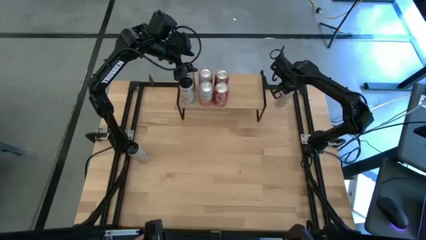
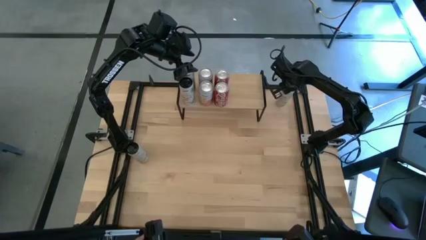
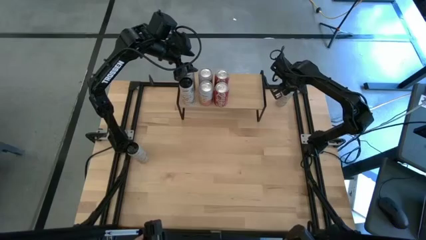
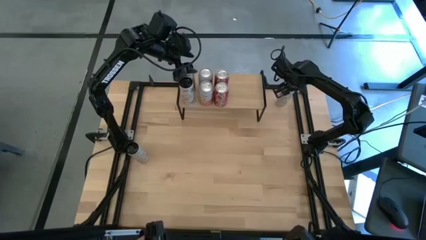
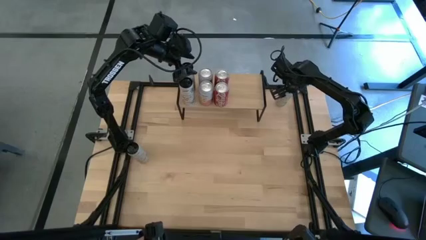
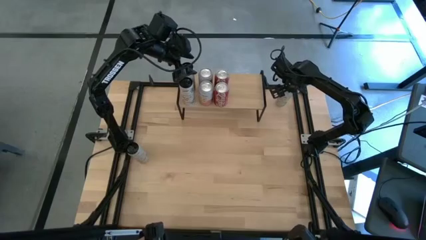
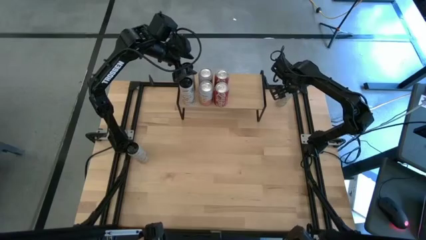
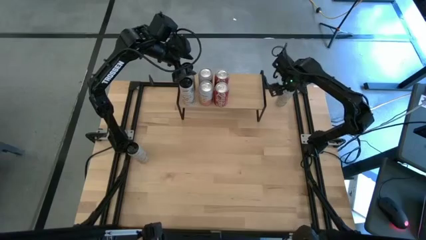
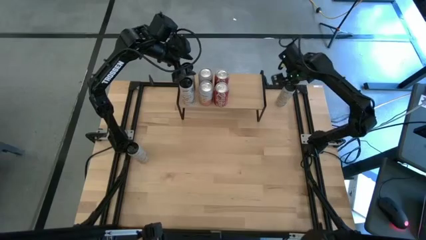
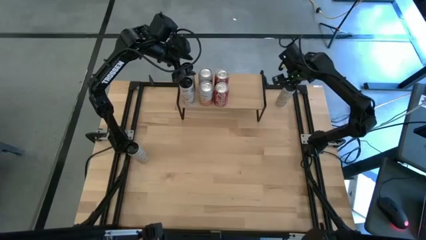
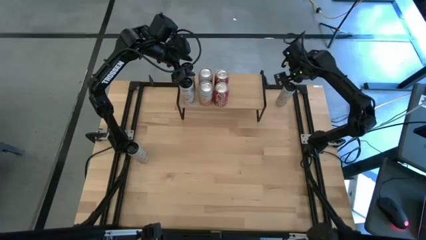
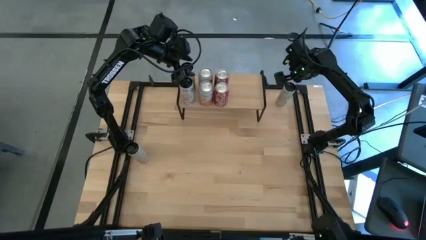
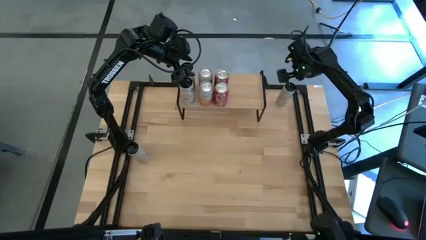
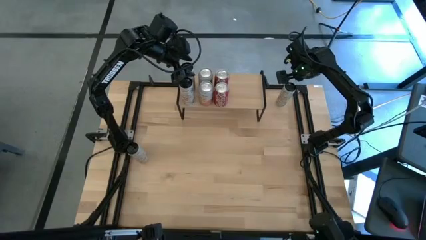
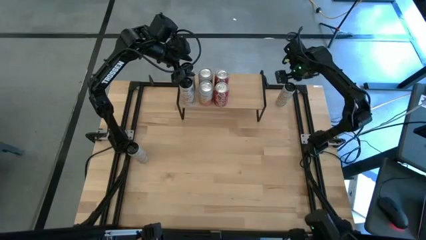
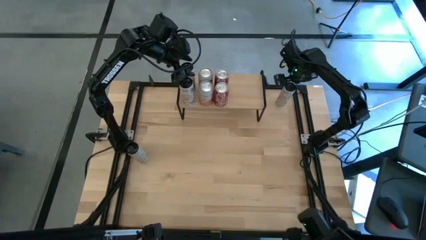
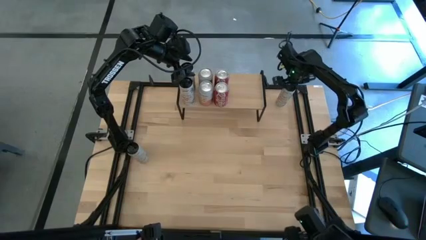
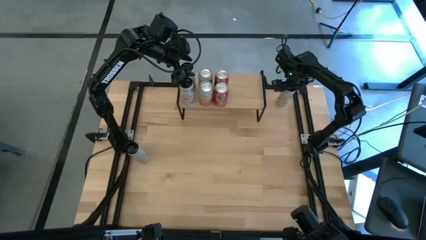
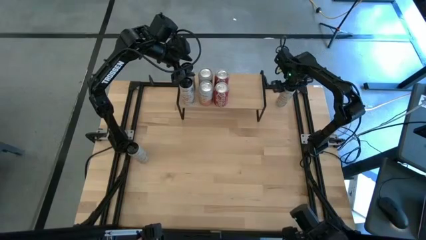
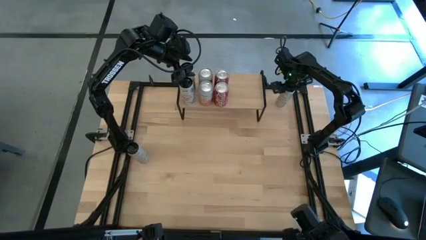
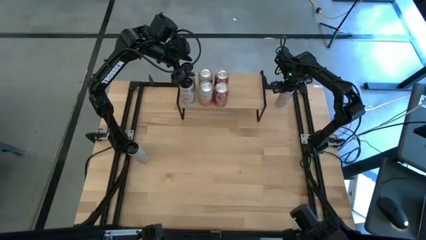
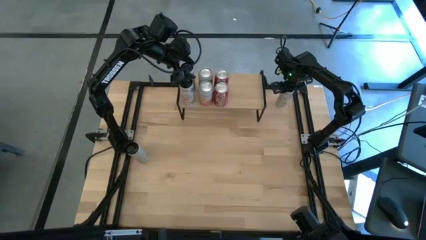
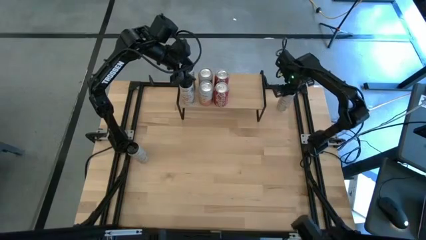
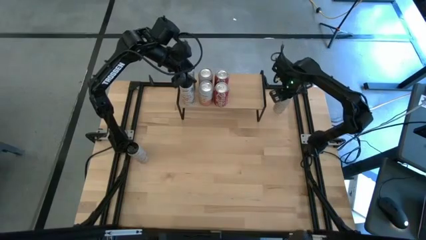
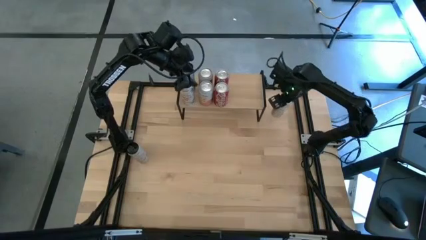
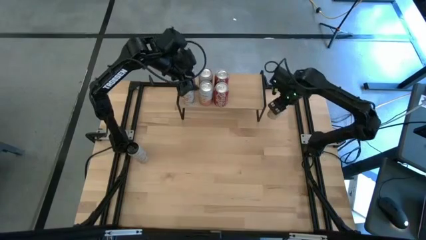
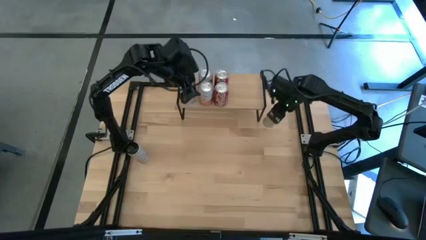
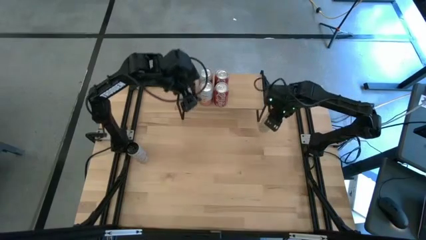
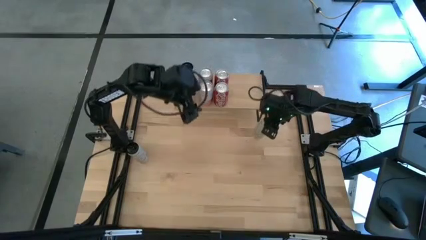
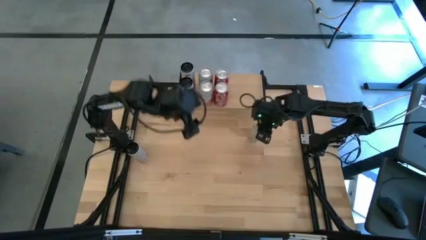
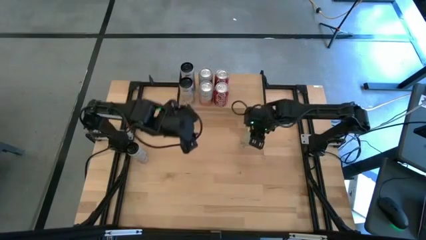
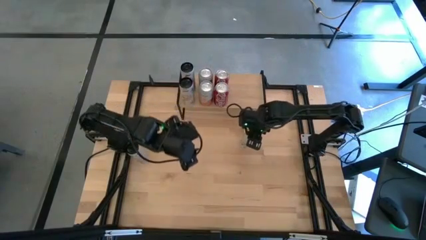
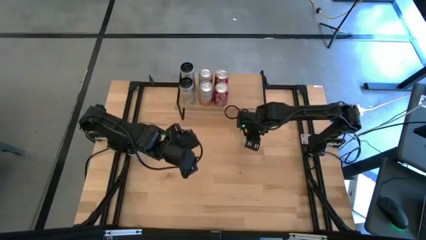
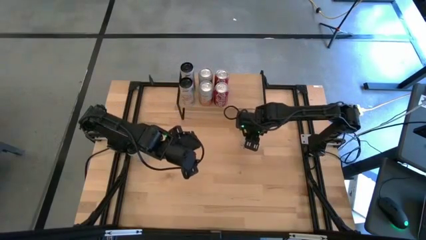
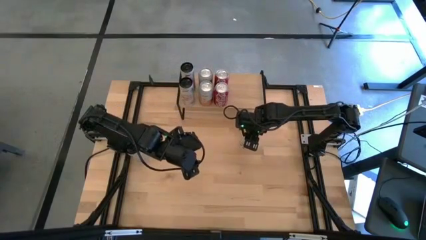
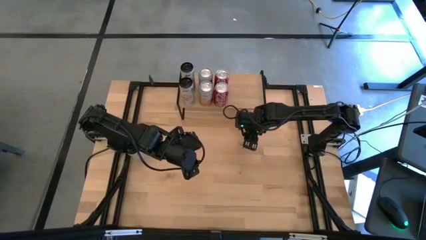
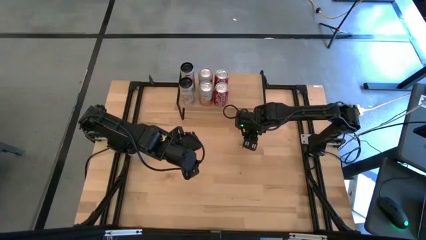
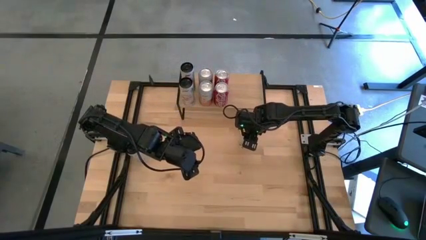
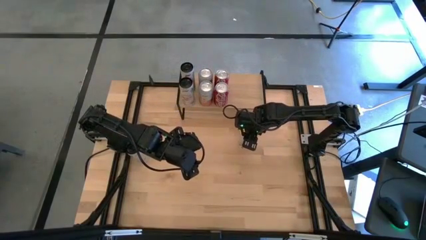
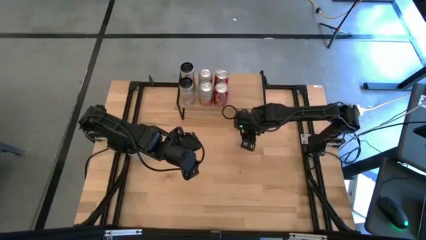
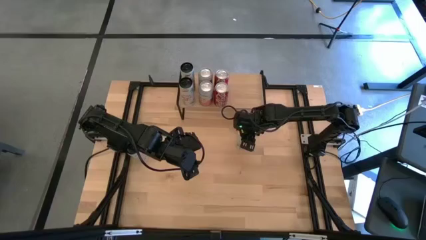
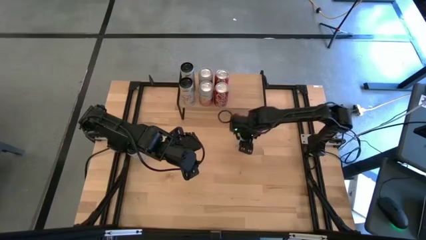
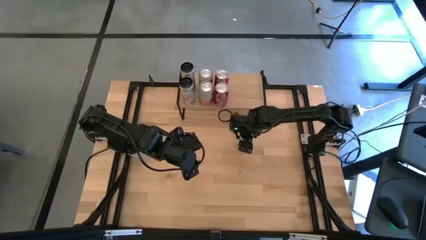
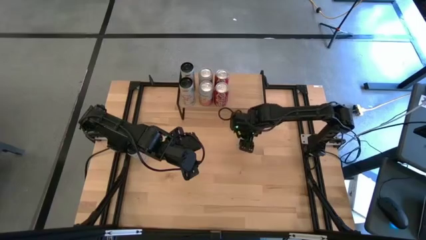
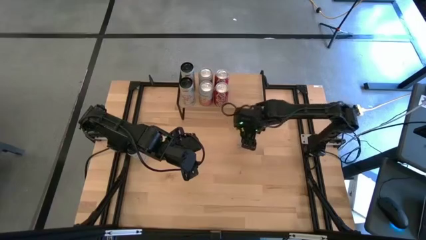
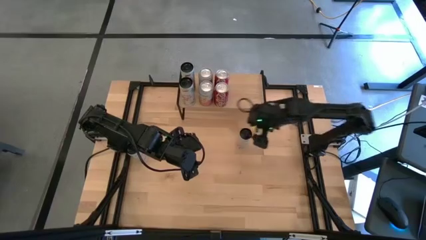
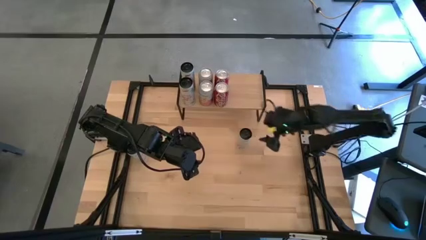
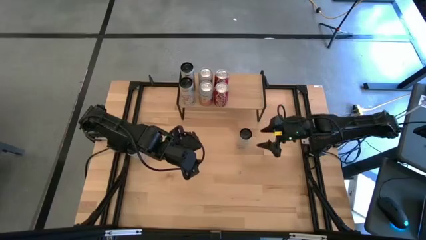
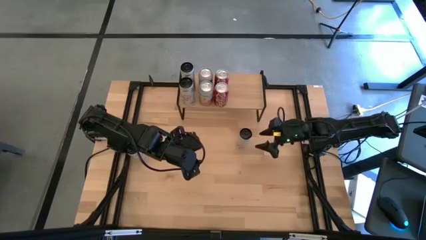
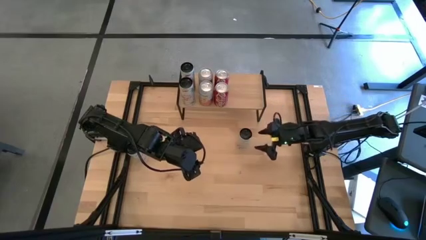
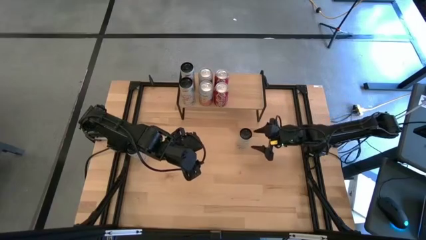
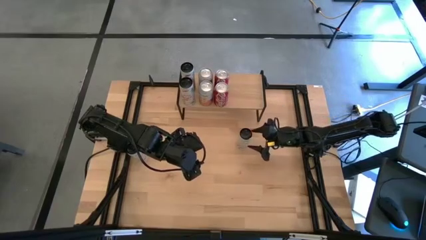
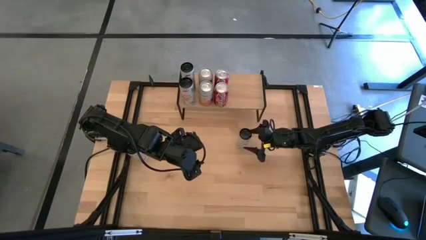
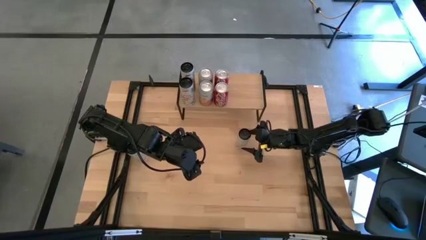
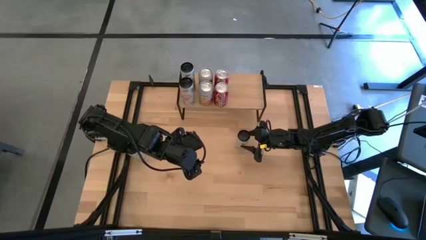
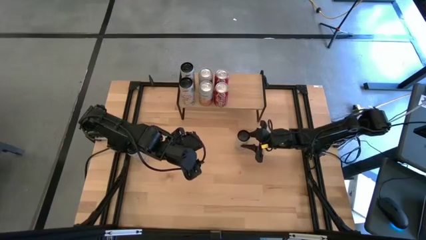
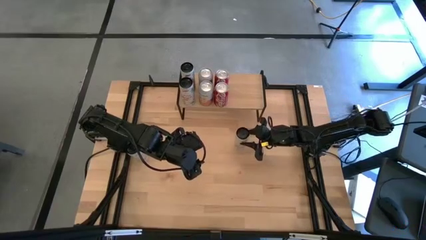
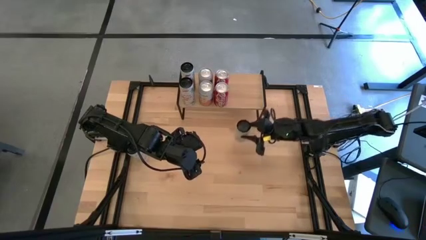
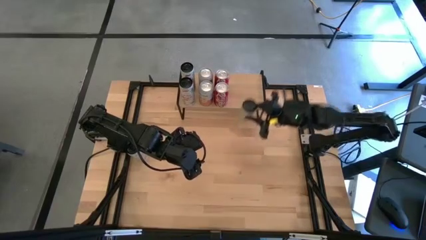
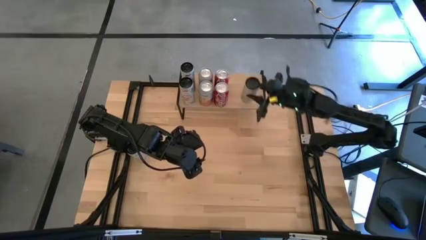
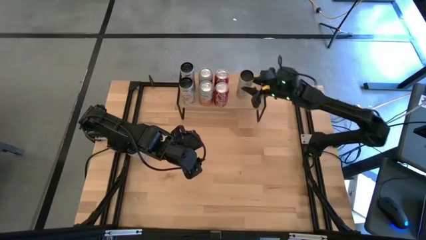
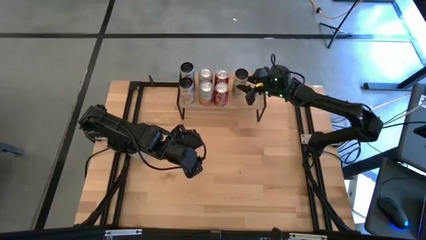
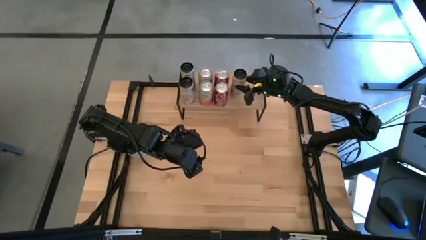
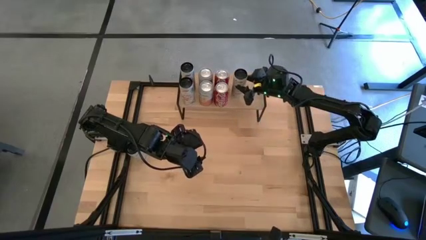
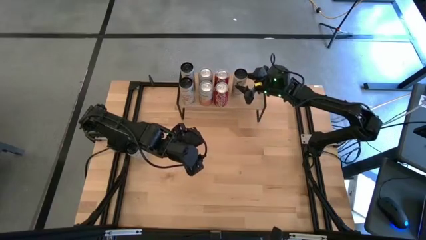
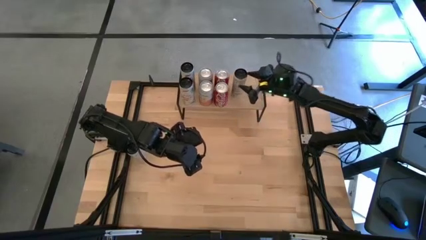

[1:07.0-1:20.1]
Task: Place canned beverage on shelf
Put the white yellow soda can on the shelf
